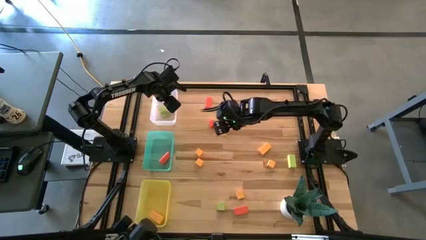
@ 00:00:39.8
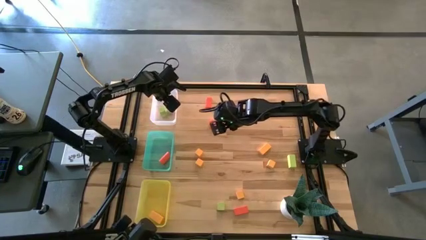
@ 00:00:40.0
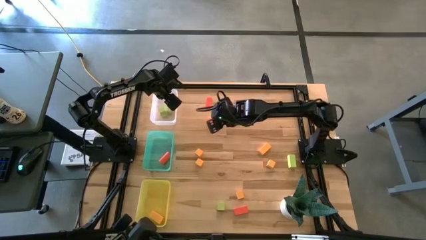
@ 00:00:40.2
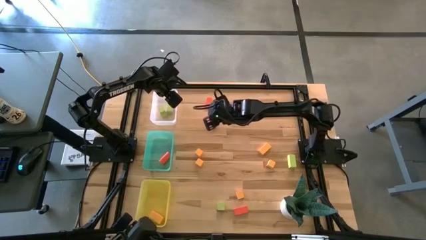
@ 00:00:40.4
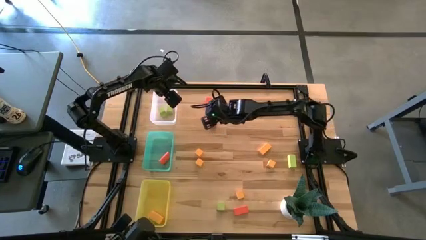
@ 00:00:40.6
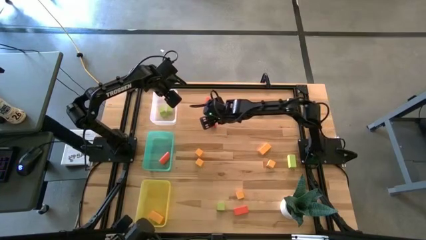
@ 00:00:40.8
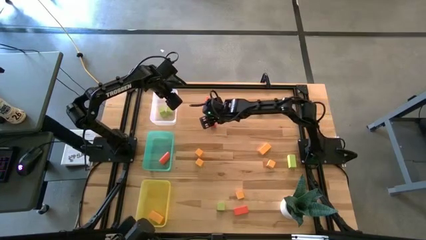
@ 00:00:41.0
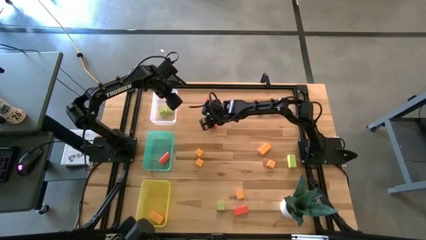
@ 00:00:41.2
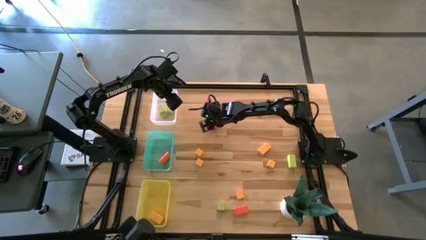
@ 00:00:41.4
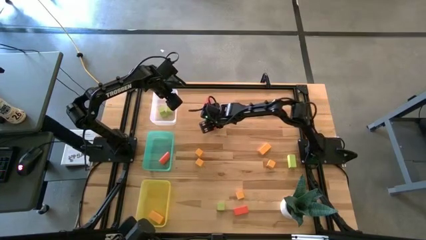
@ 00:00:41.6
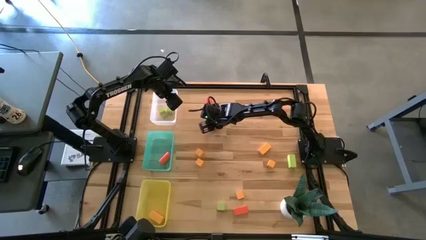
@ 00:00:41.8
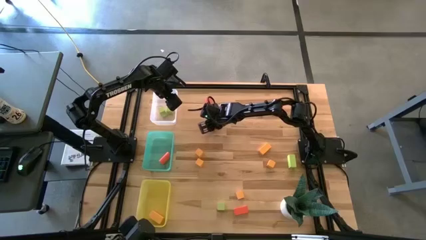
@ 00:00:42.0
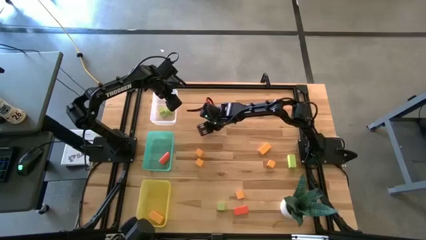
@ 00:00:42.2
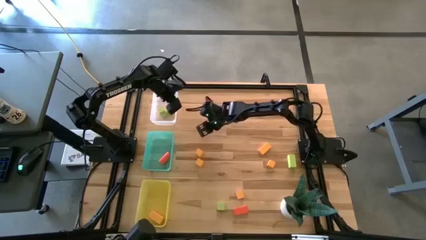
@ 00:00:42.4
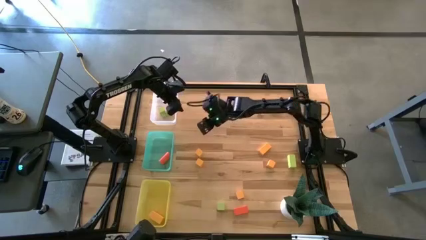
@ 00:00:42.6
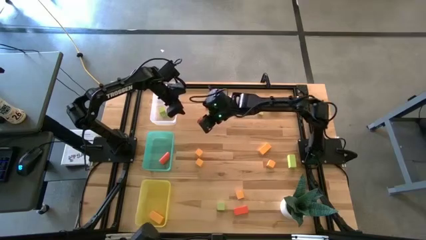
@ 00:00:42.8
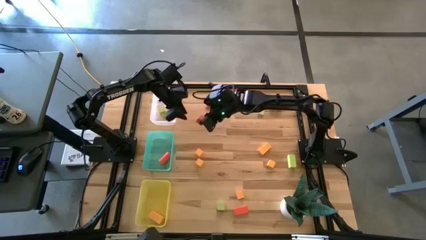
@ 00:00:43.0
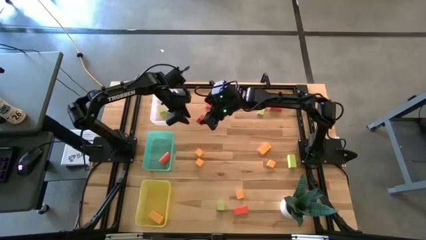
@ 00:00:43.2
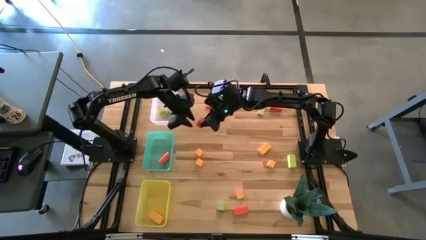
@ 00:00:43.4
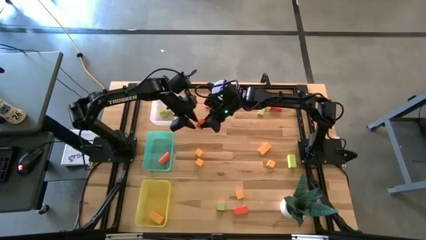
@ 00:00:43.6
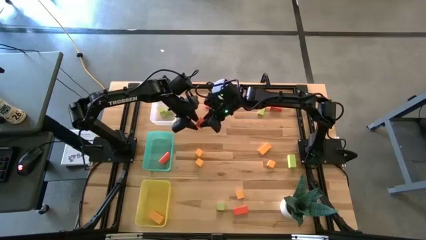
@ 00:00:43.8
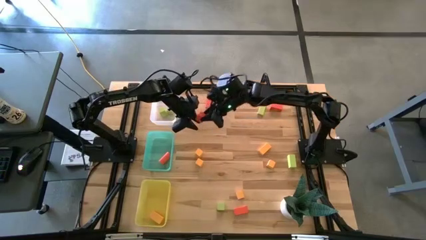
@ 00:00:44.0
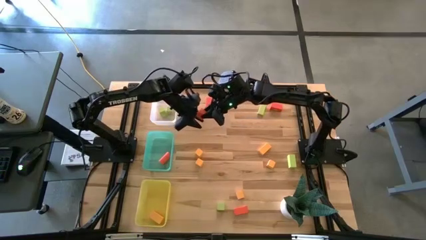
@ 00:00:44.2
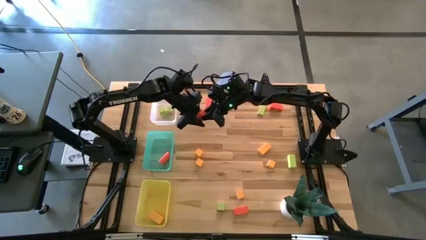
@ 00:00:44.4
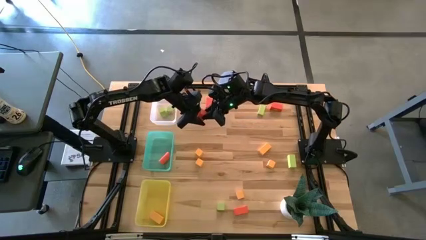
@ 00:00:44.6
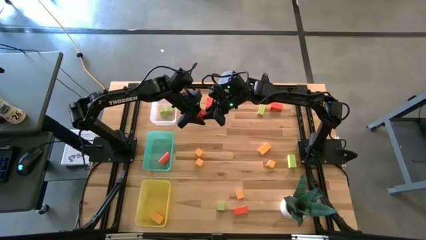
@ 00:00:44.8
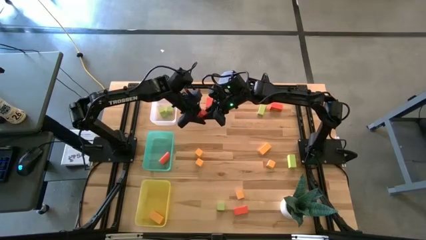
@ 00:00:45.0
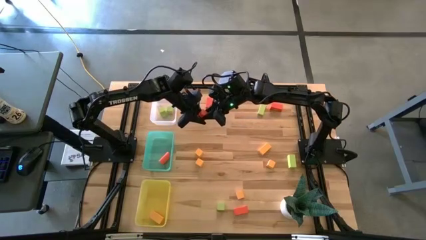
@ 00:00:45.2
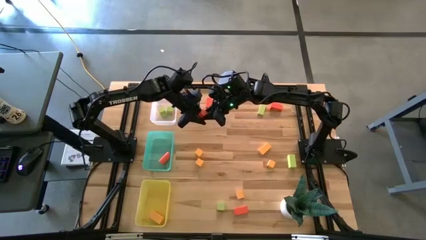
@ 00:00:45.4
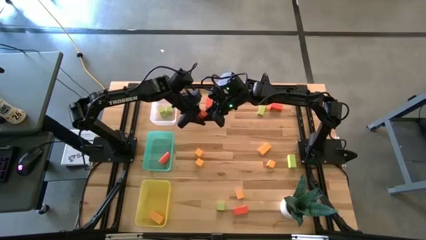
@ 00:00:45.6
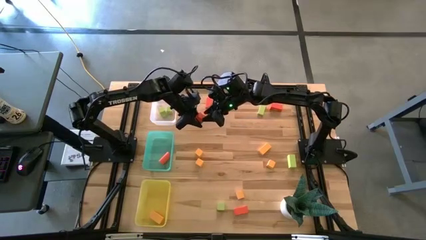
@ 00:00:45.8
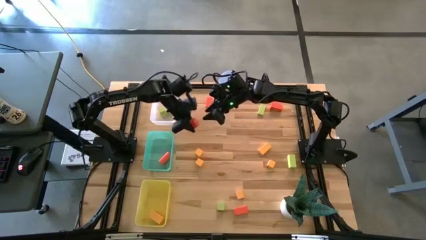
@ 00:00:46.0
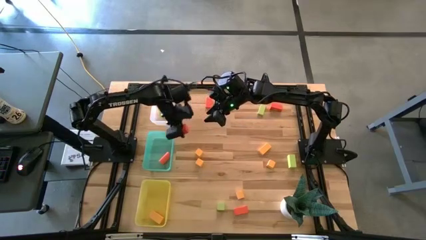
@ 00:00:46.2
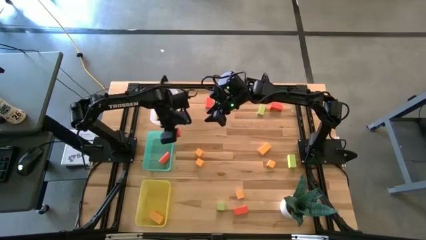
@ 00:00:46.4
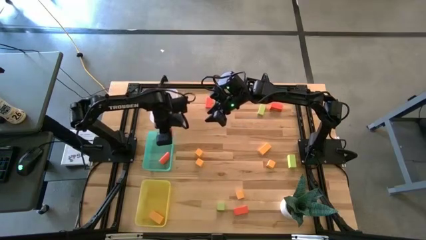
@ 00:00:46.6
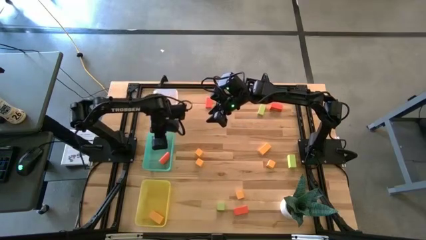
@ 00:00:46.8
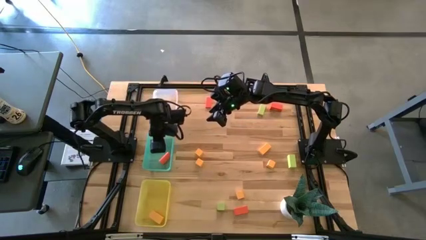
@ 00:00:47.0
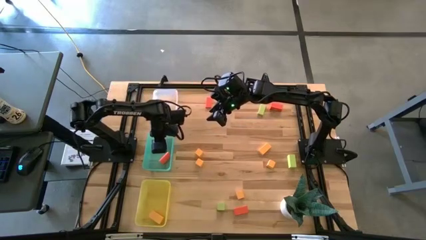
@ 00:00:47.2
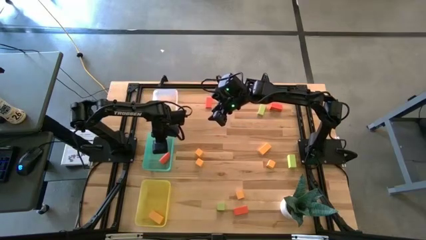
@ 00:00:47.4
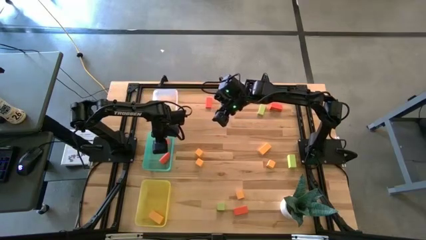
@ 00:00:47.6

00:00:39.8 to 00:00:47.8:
Task: Sort & place blocks by color
Put the orange cube block into the blue bin

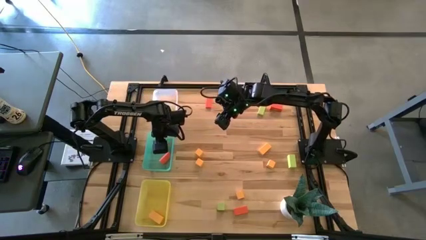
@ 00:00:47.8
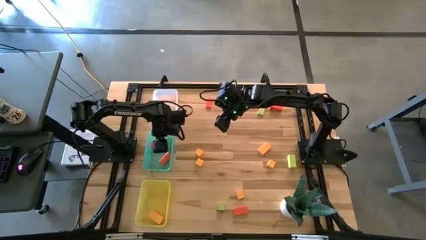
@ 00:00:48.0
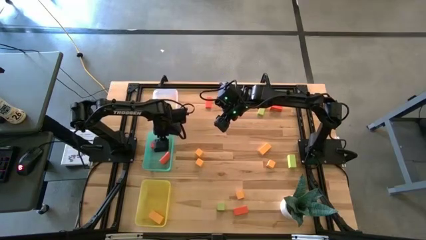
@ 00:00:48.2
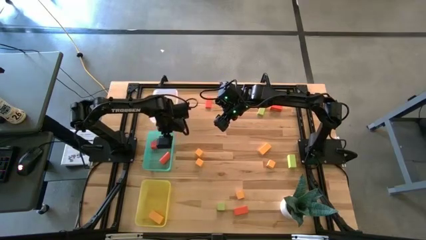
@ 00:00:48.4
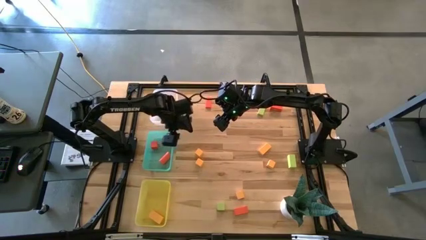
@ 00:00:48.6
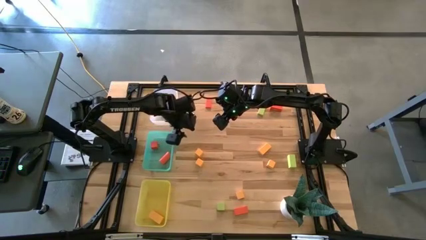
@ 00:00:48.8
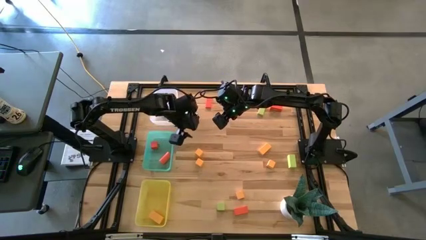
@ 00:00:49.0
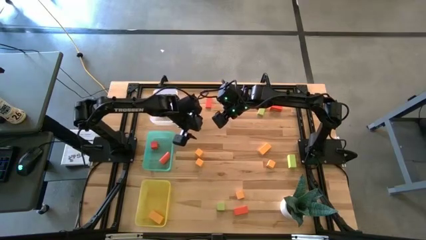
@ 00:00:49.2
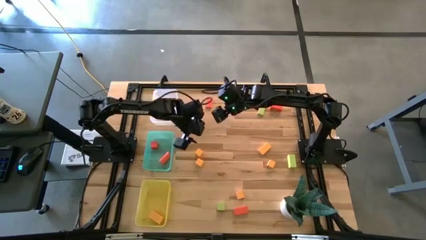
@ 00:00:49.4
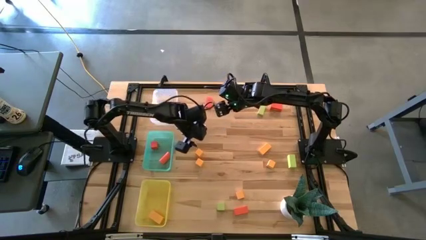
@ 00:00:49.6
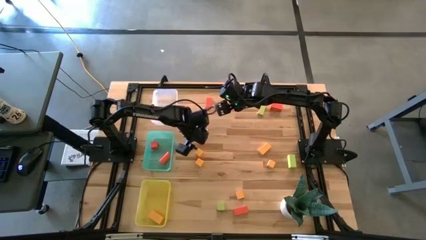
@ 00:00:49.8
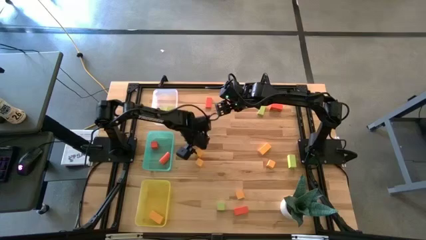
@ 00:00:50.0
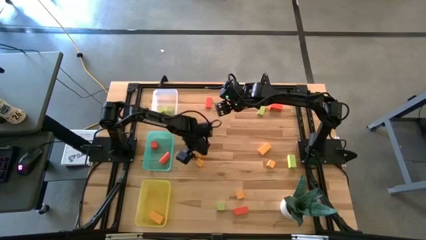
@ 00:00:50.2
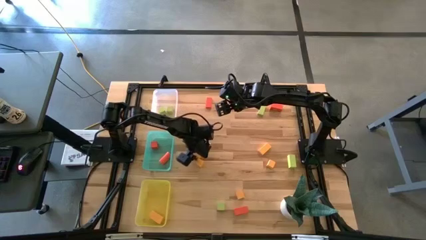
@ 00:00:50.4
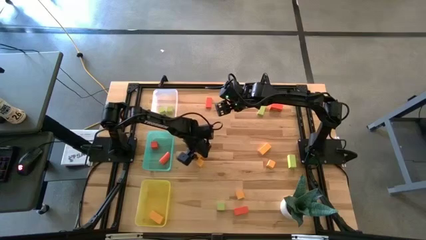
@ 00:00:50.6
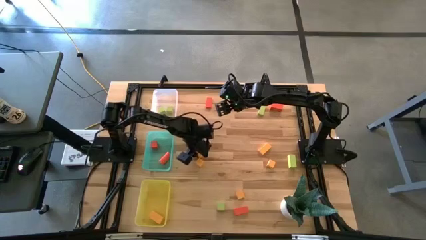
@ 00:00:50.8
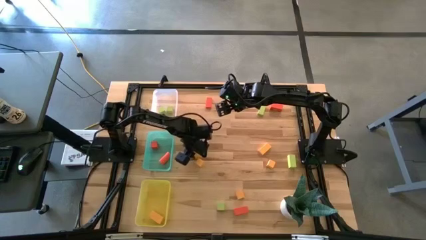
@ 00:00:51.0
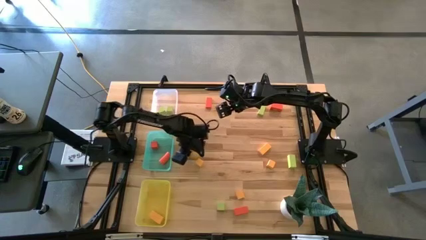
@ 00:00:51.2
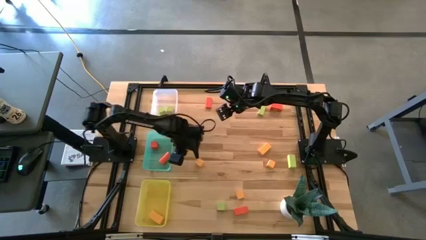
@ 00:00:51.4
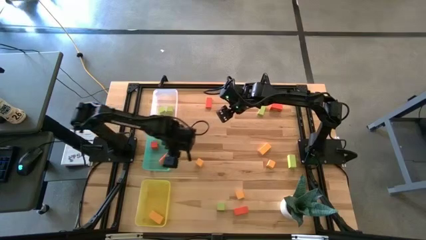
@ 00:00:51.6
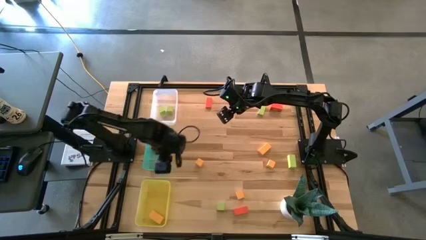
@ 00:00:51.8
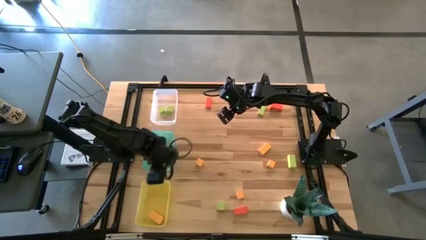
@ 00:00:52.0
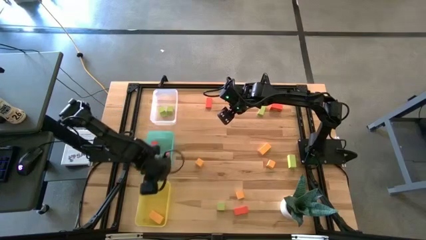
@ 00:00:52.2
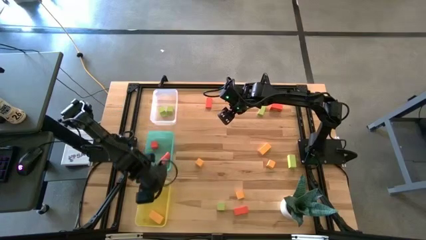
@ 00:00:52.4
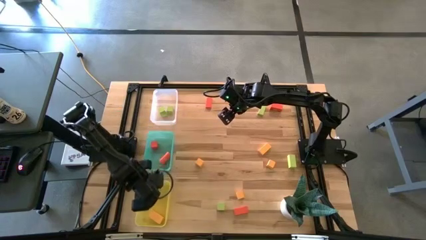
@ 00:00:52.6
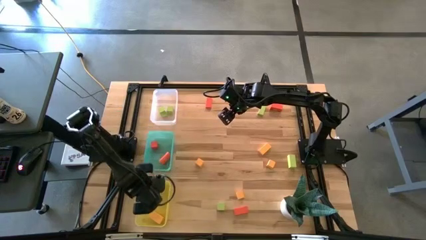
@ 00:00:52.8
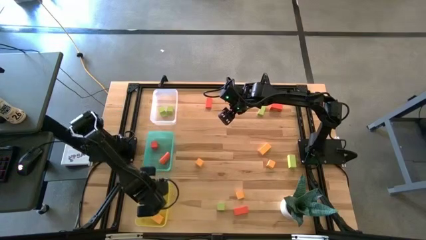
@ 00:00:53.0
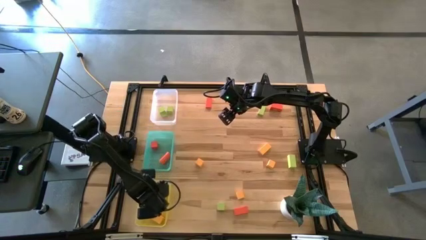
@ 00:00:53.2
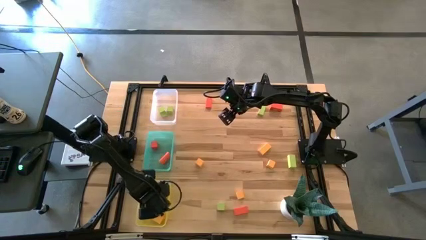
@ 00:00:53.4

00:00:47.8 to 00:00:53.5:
Put the yellow cube block into the yellow bin
